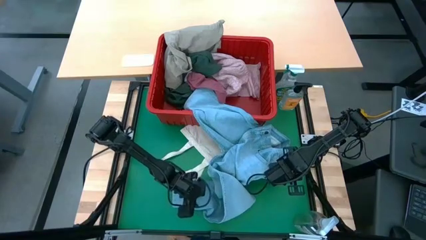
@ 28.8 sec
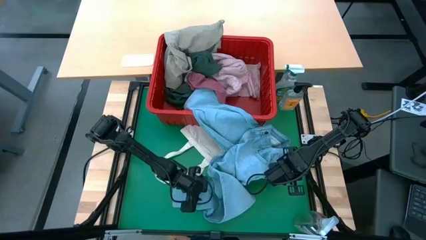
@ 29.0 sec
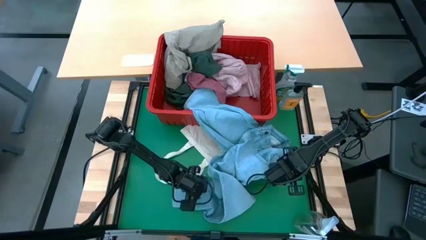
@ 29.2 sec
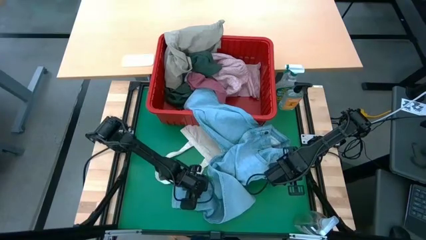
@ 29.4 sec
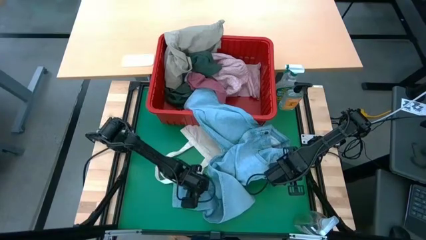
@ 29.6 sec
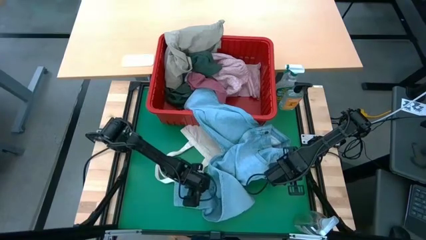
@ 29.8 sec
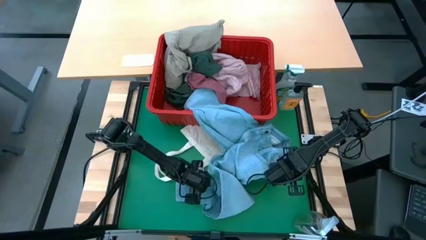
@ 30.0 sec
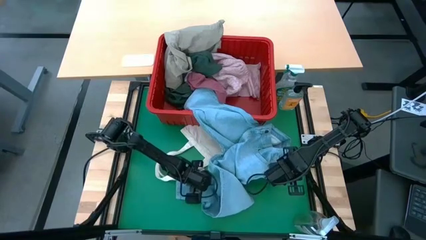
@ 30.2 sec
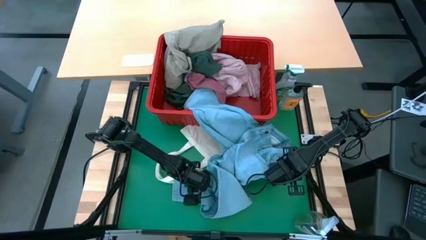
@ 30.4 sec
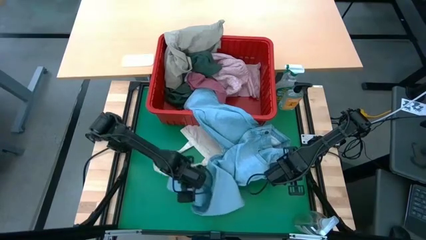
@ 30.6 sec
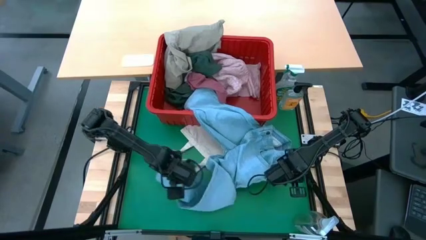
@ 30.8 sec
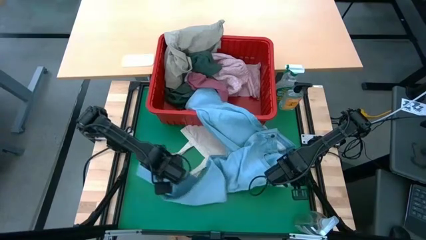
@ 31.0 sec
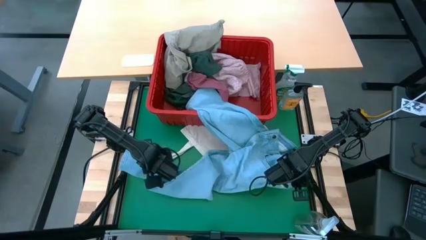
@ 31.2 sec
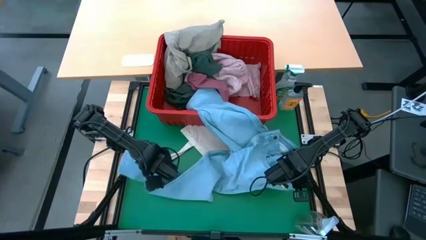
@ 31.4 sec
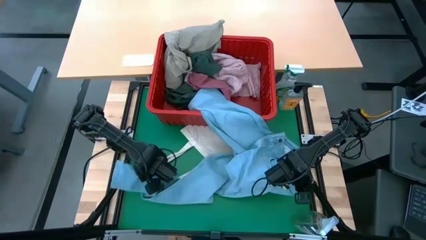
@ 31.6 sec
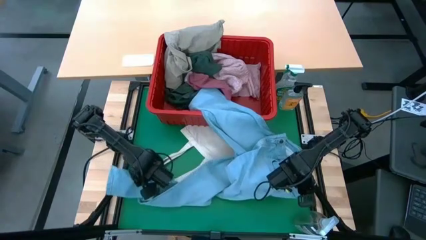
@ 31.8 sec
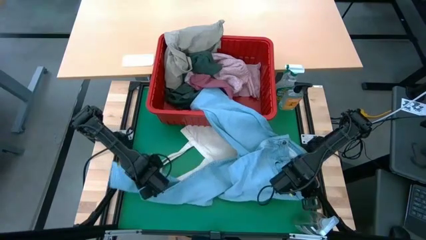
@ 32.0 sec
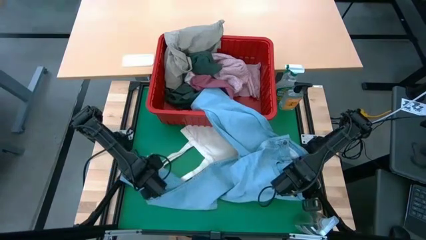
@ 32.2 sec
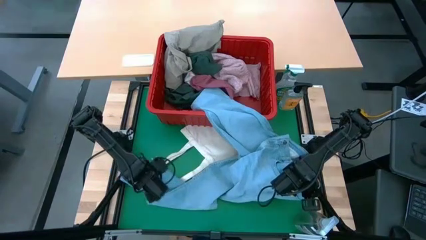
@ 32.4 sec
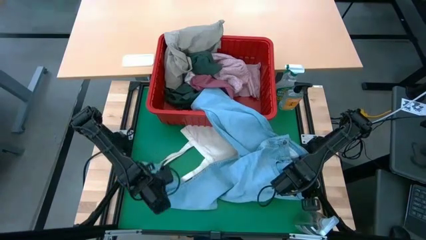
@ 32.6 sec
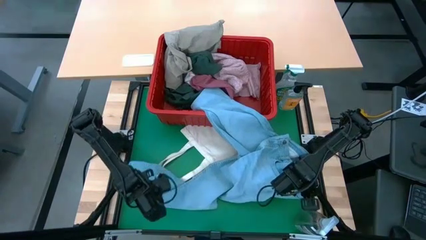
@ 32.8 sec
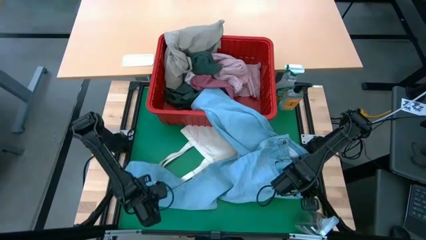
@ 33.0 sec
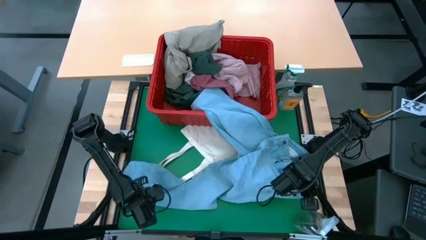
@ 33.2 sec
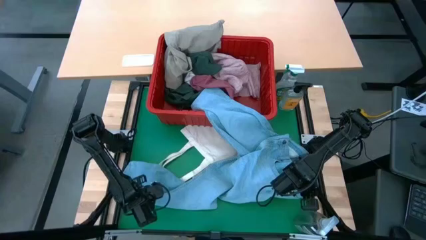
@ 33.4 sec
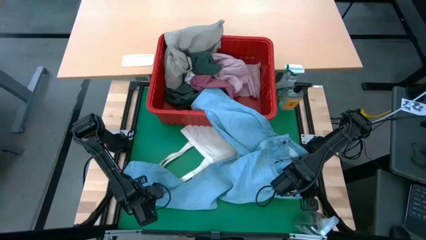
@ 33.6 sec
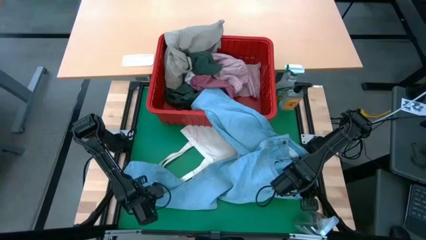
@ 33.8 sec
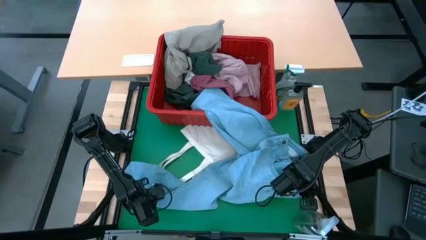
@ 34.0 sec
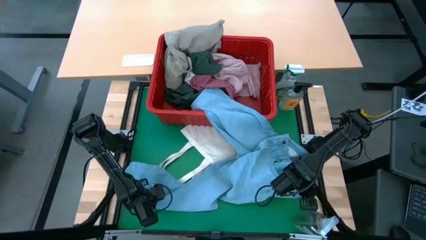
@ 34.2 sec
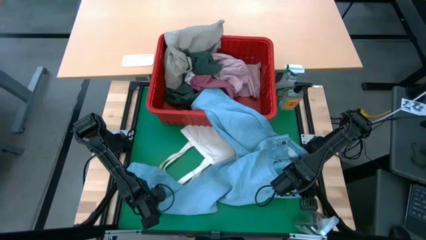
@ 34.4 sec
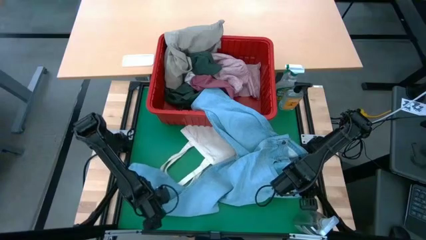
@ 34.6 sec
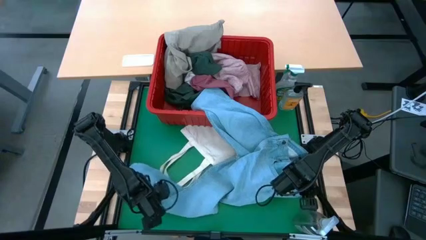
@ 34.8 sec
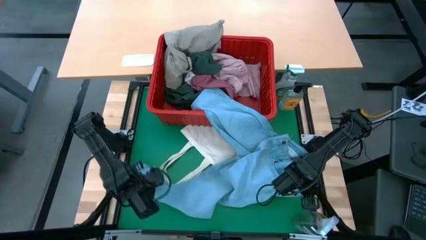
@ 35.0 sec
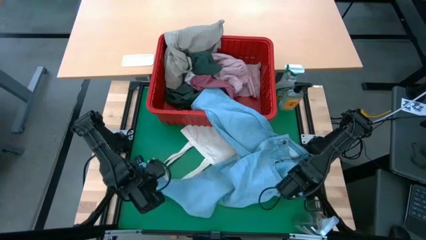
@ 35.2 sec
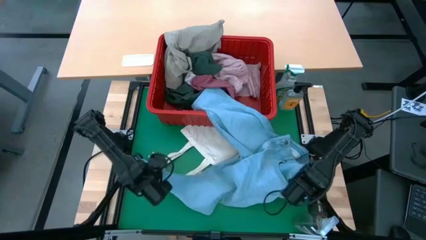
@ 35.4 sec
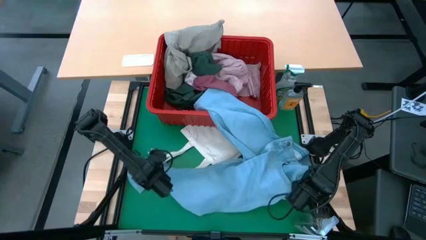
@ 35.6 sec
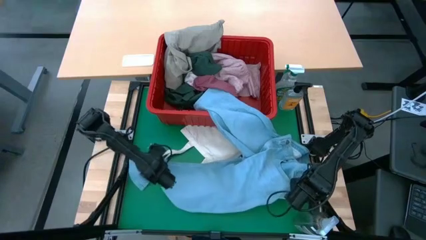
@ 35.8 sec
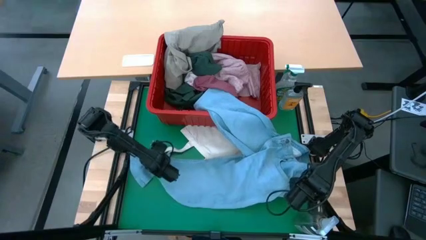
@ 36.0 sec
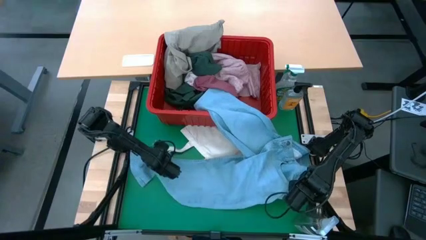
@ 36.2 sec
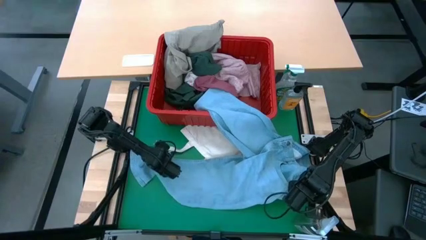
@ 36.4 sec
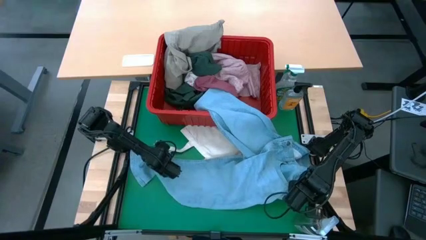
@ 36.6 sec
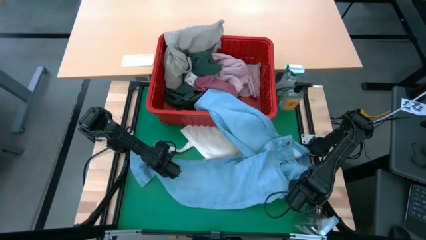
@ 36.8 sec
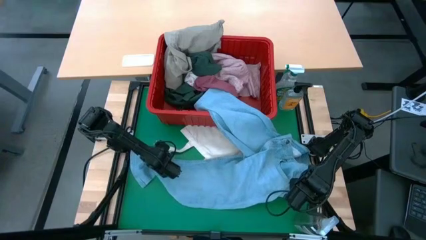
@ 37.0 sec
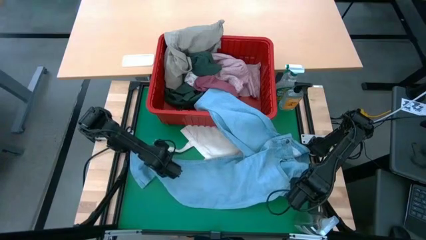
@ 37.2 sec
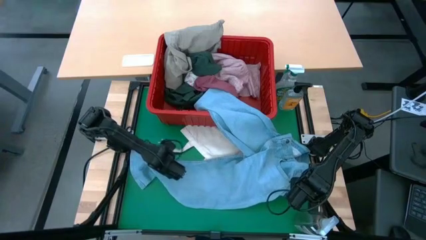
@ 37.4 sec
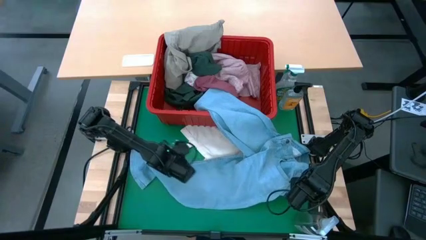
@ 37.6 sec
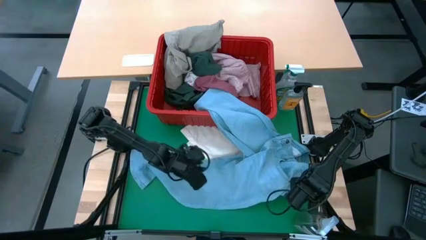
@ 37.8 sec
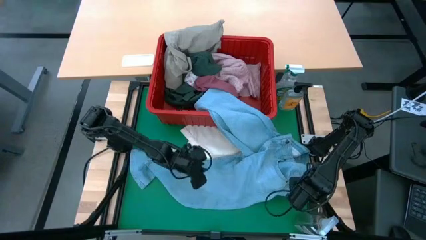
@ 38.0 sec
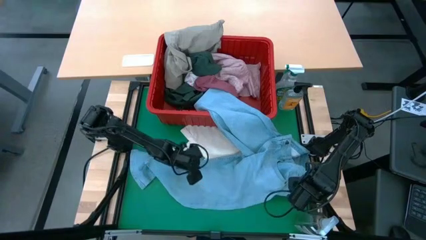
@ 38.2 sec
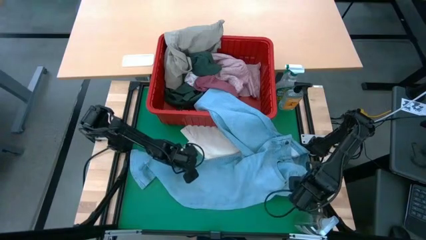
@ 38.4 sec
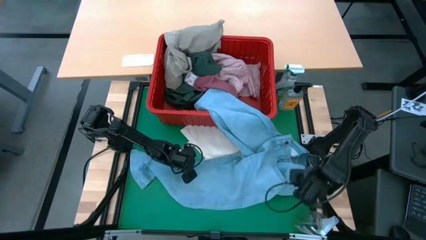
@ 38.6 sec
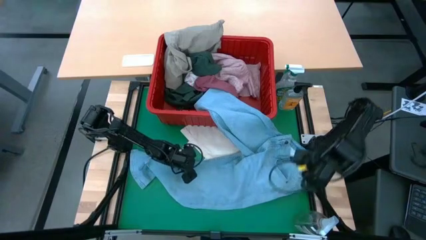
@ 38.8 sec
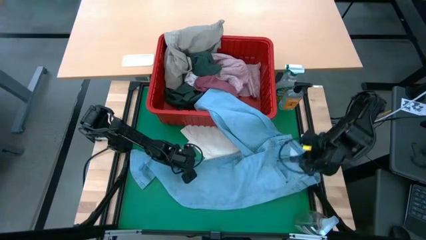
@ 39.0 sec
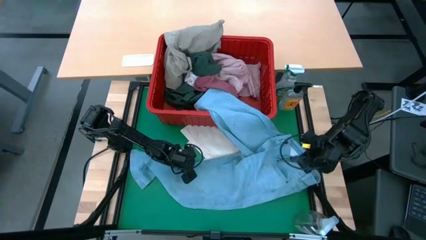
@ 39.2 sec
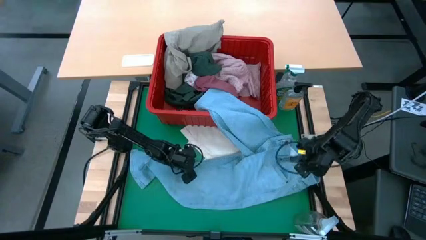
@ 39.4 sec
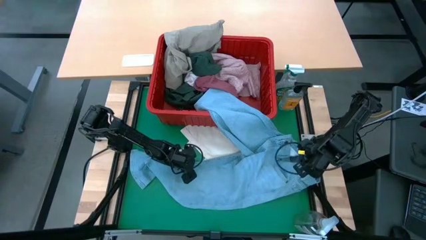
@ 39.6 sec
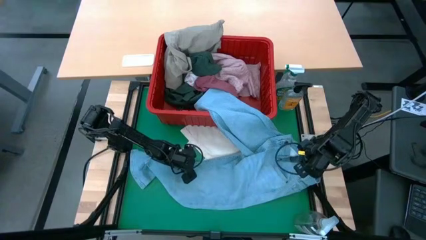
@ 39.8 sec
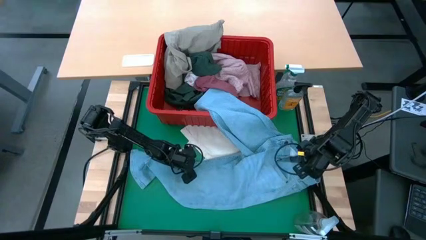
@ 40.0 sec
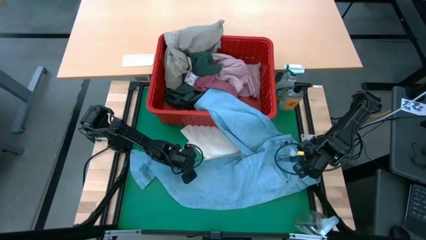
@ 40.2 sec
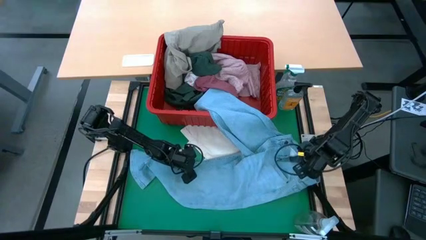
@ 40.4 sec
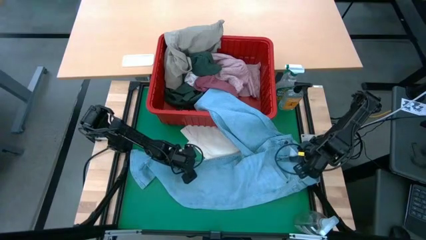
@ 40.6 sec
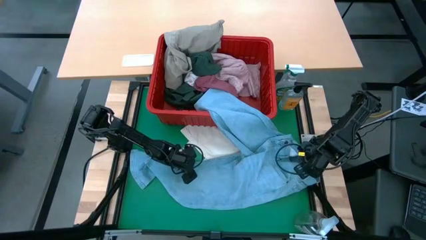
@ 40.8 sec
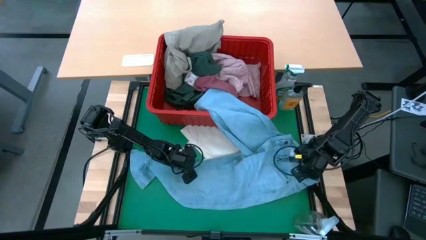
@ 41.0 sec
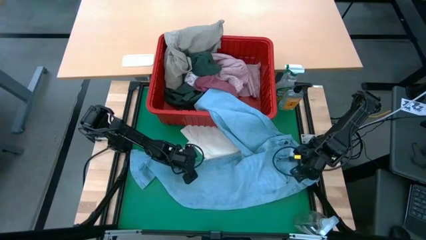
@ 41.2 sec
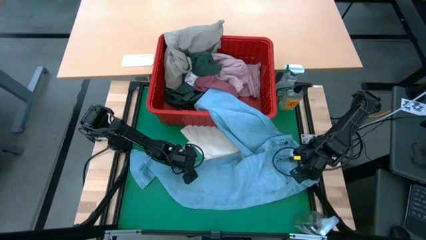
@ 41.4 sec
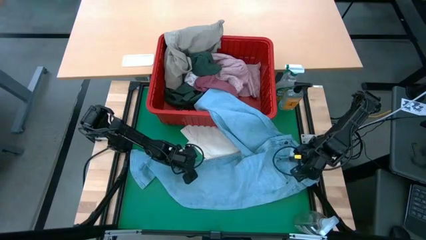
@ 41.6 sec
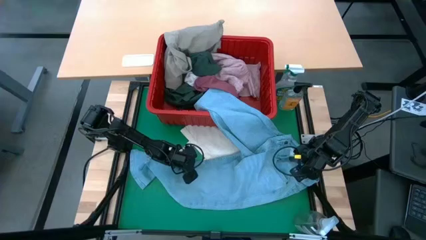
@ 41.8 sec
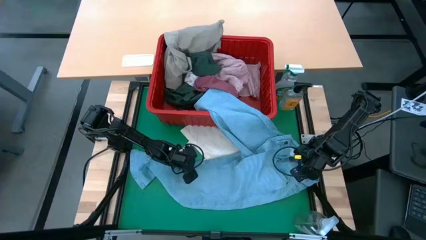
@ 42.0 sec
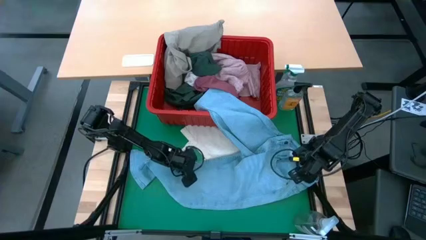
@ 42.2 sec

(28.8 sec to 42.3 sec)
Task: Fold laundry
Fold the blue jeans

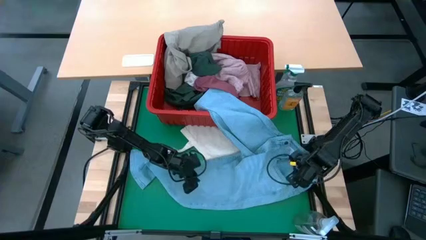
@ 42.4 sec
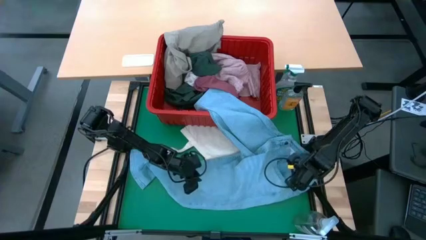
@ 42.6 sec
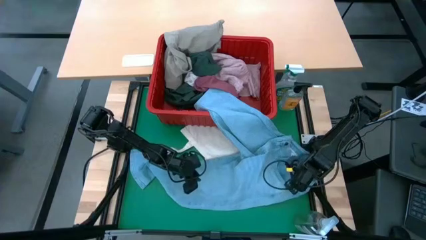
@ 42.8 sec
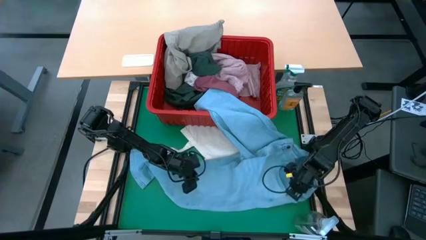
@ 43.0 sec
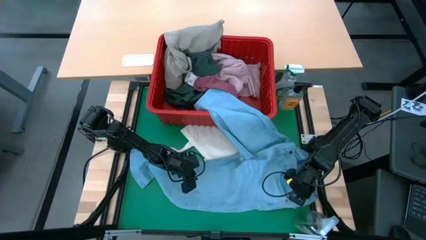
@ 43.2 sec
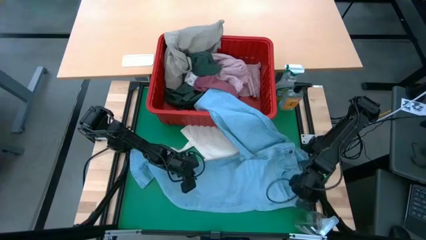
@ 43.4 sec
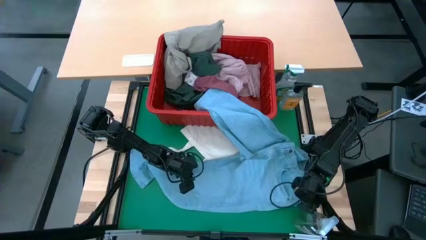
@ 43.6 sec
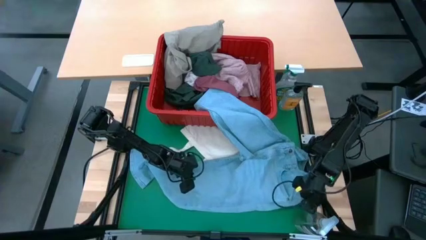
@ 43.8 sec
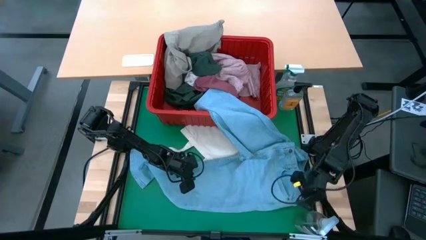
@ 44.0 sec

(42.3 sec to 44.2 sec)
Fold the blue jeans
